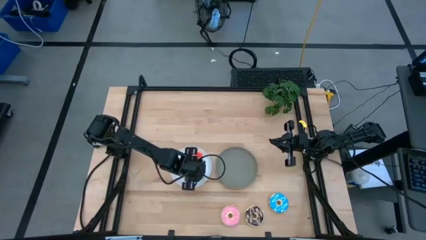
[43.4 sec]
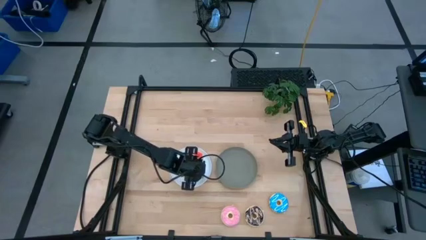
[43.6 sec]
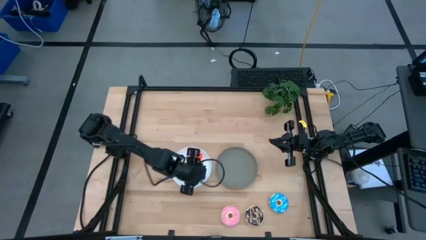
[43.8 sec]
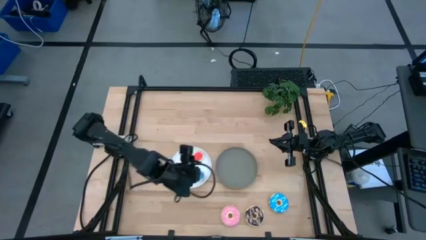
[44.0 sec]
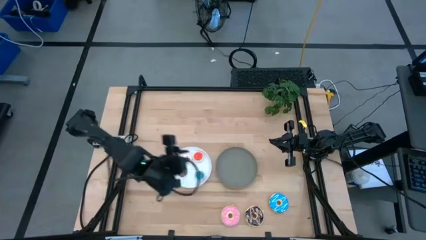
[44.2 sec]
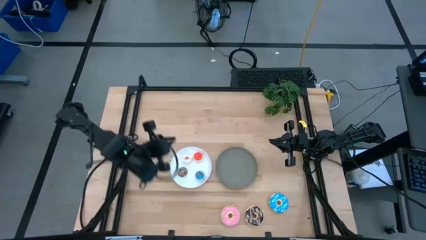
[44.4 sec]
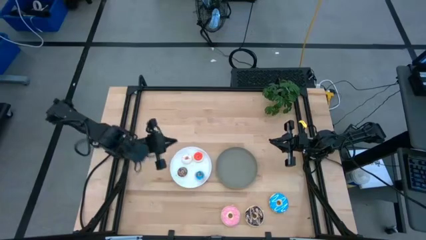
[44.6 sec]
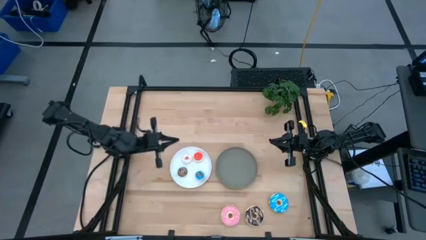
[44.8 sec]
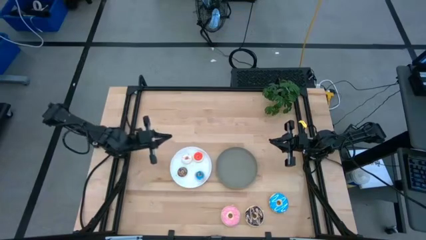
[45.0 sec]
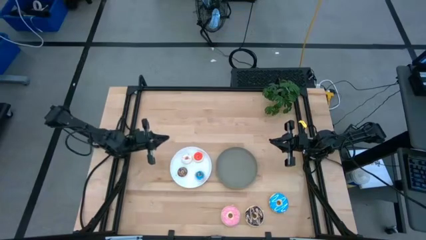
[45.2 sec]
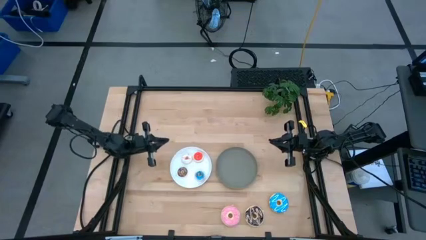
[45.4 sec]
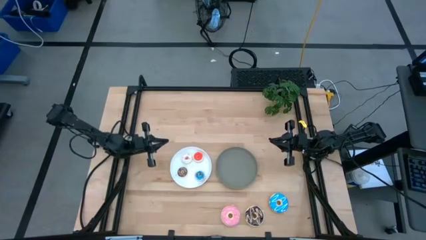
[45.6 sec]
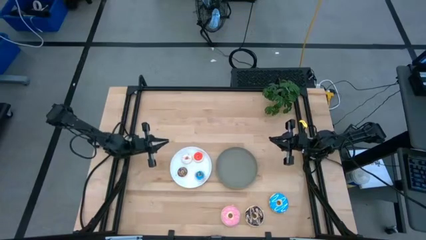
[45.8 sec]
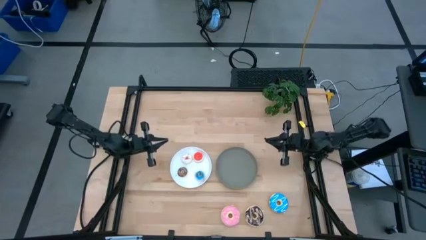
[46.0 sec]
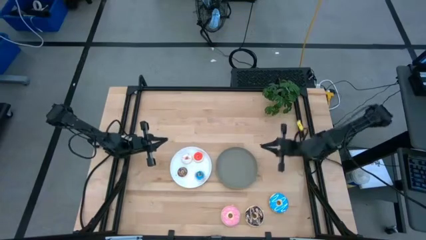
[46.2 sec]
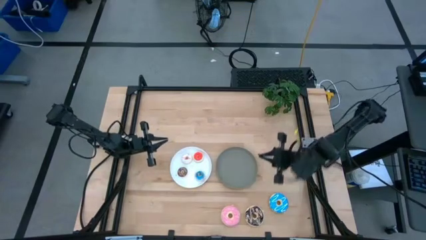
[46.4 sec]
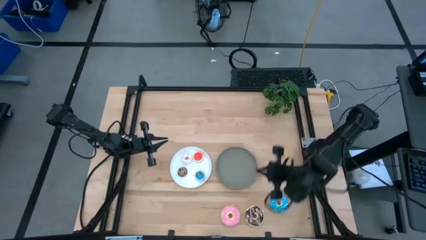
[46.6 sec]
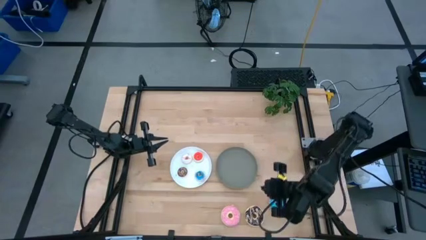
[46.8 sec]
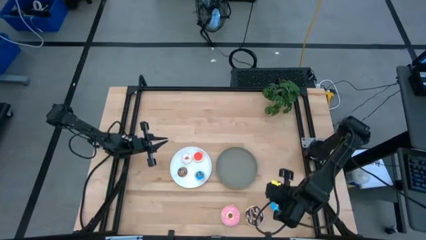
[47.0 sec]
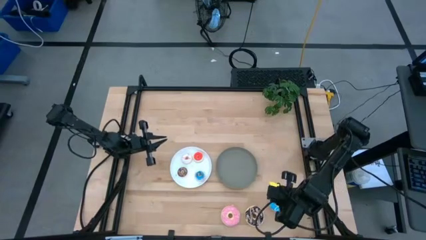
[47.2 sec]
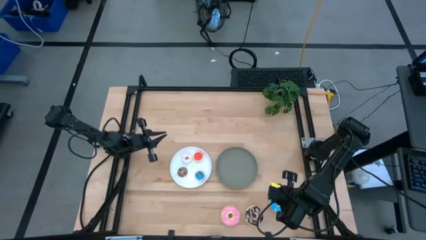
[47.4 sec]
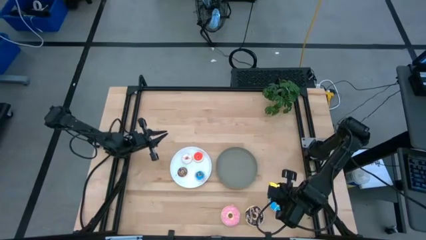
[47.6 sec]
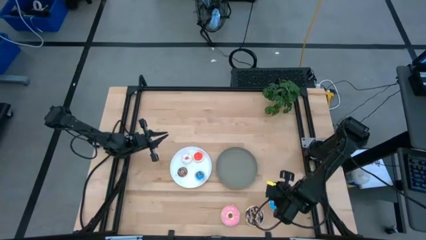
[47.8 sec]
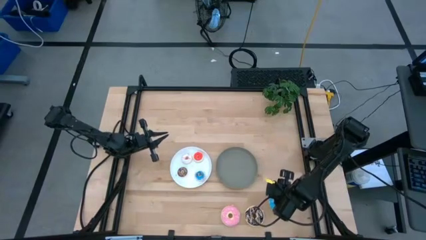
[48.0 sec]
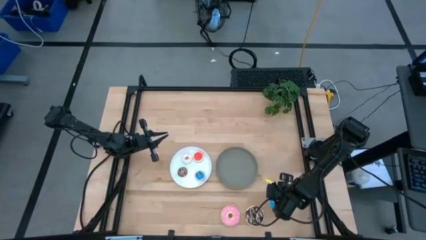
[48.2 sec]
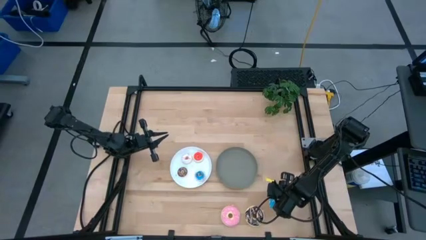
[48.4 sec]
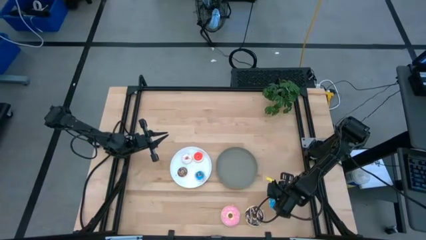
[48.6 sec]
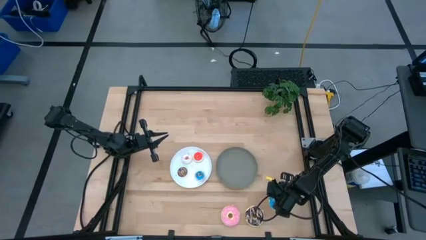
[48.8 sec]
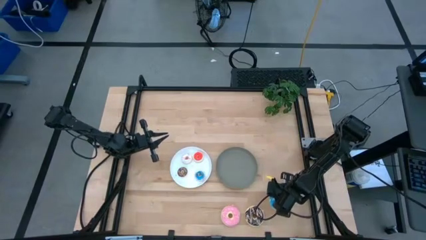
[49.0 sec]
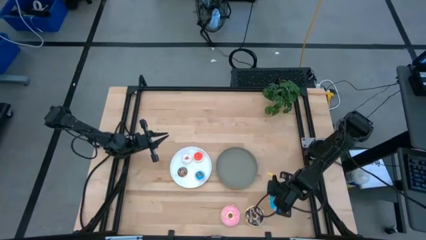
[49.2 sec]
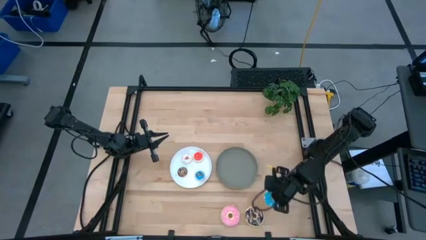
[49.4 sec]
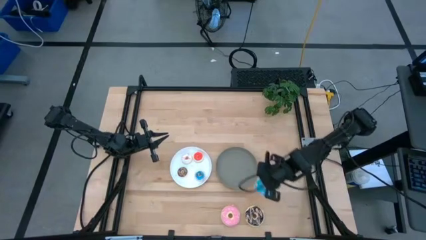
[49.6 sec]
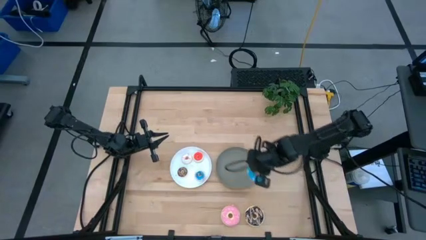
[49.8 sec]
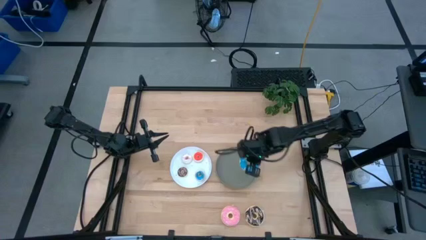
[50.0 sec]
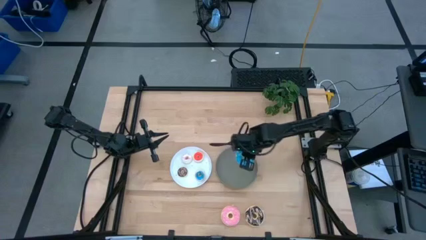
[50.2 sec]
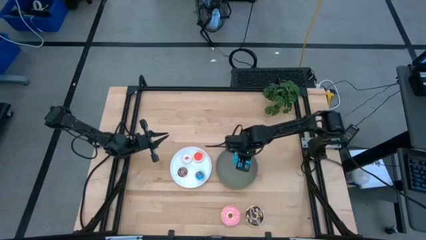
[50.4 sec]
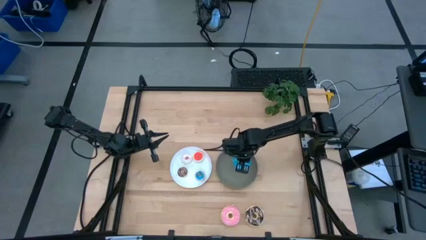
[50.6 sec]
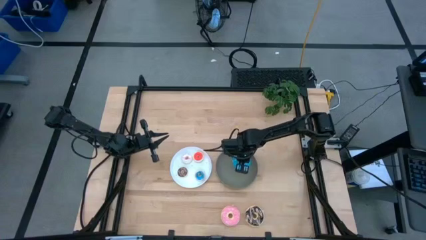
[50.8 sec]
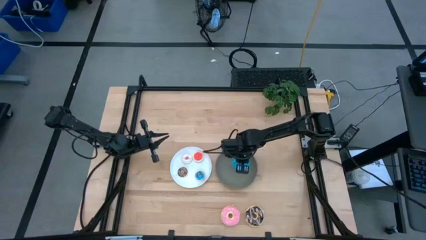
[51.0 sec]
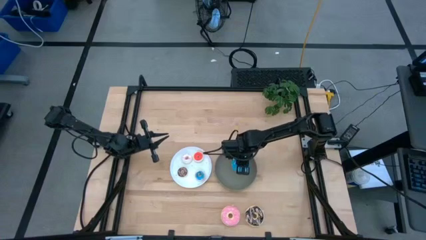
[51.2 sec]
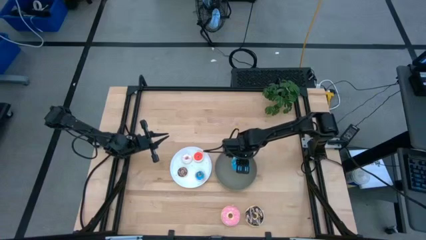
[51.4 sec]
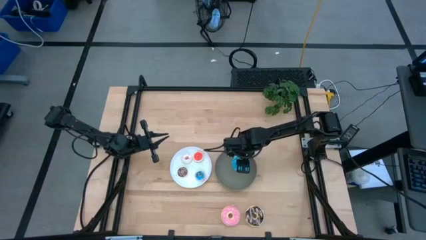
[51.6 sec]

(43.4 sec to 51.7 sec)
Task: Pick & Place donuts
Put the large blue donut on the gray plate

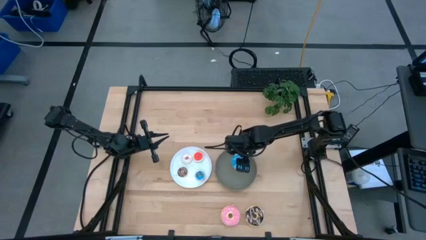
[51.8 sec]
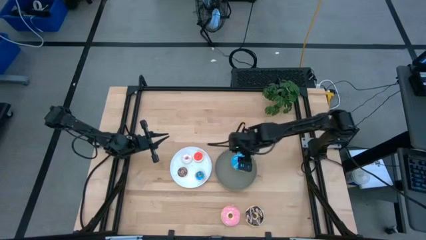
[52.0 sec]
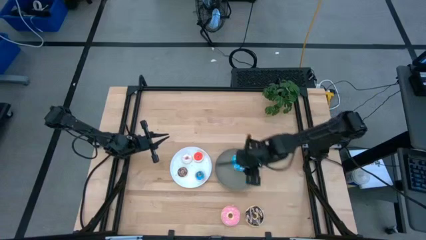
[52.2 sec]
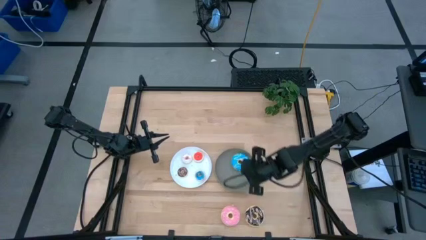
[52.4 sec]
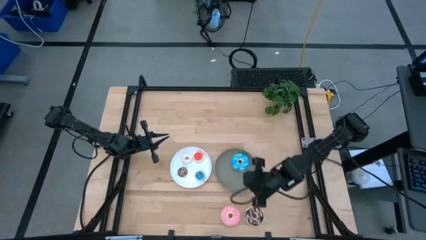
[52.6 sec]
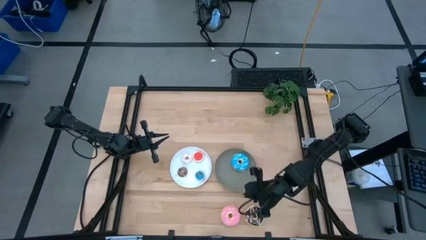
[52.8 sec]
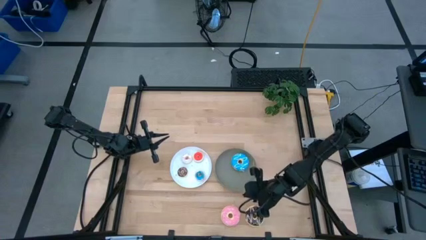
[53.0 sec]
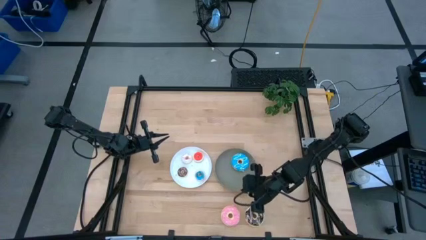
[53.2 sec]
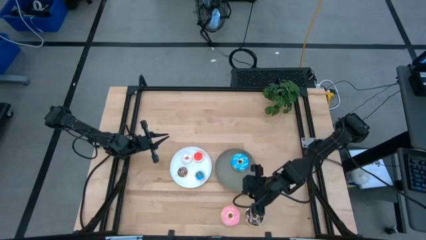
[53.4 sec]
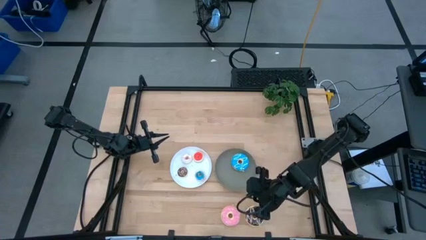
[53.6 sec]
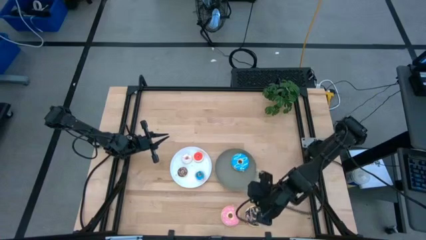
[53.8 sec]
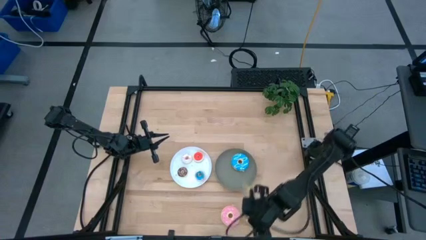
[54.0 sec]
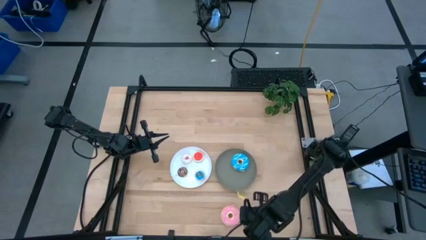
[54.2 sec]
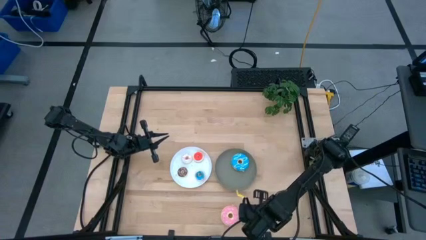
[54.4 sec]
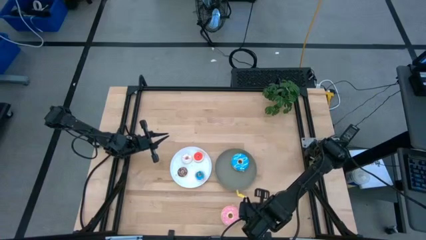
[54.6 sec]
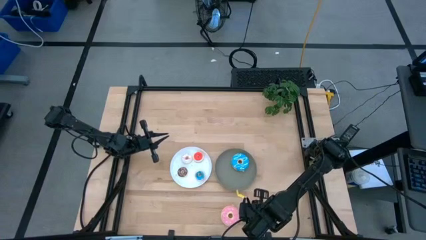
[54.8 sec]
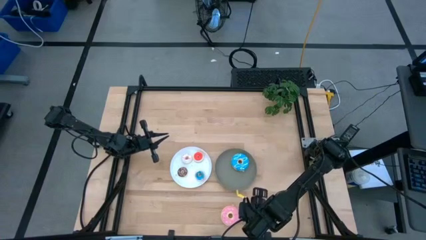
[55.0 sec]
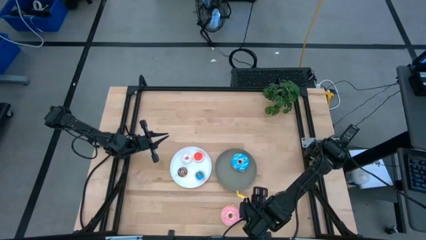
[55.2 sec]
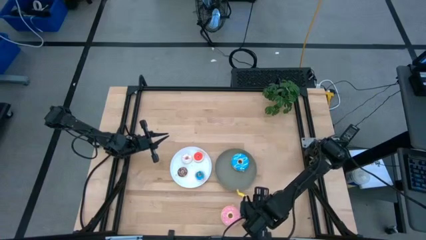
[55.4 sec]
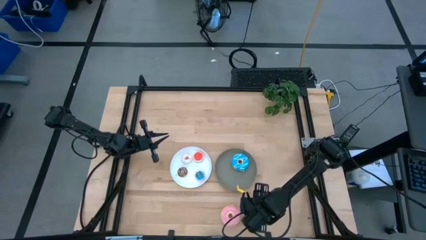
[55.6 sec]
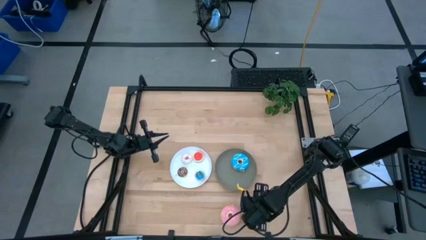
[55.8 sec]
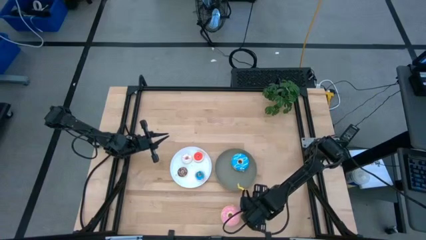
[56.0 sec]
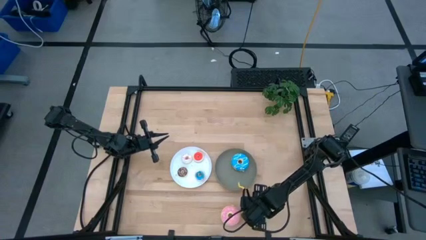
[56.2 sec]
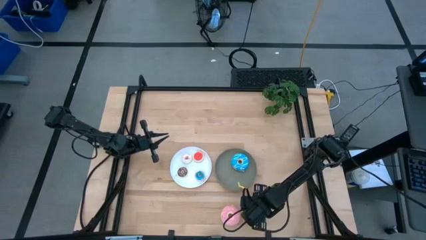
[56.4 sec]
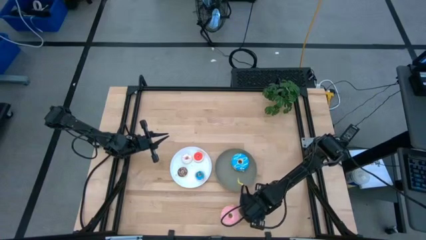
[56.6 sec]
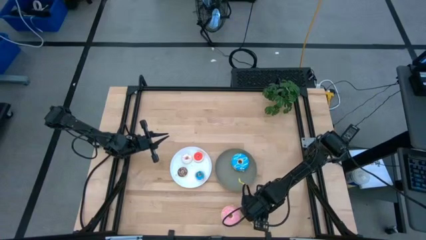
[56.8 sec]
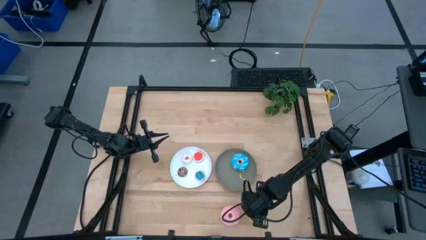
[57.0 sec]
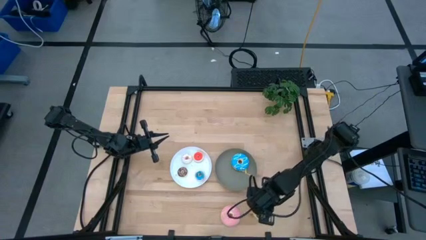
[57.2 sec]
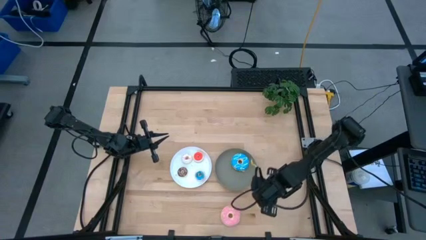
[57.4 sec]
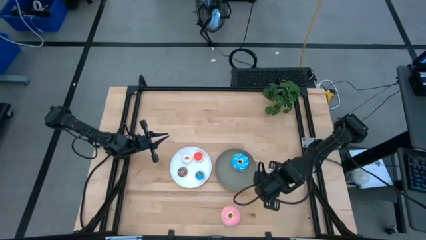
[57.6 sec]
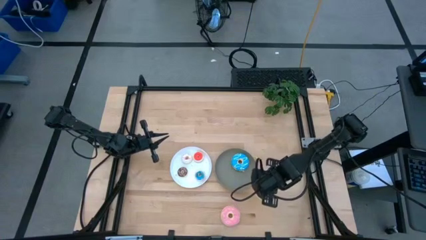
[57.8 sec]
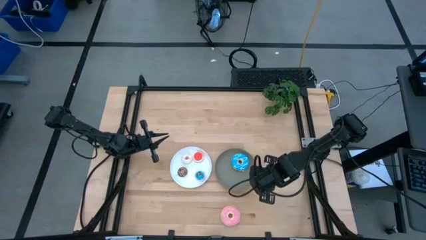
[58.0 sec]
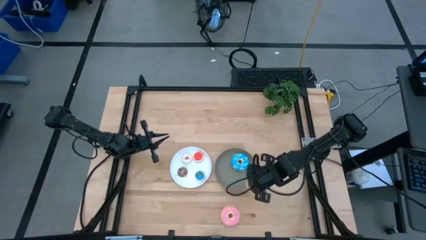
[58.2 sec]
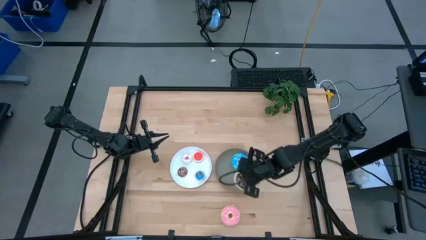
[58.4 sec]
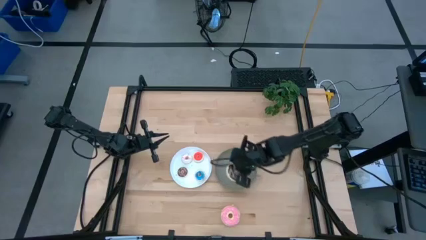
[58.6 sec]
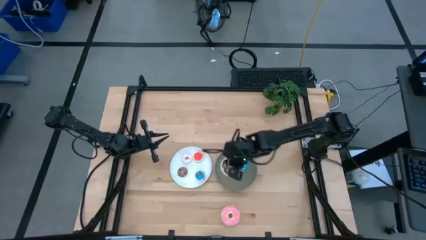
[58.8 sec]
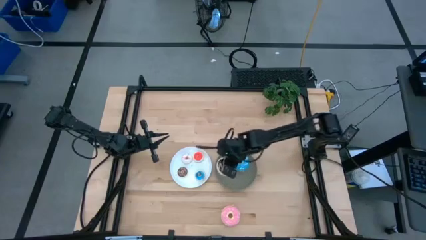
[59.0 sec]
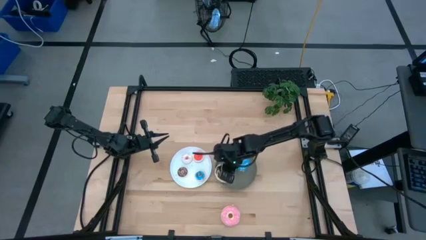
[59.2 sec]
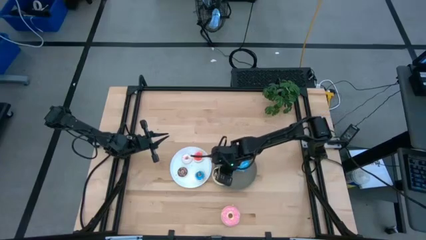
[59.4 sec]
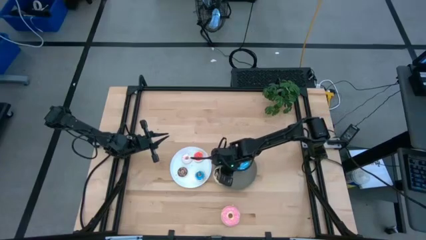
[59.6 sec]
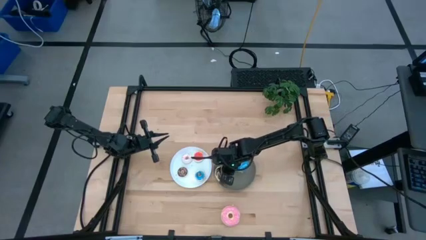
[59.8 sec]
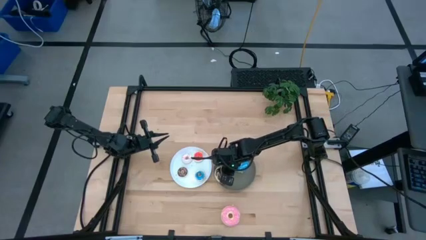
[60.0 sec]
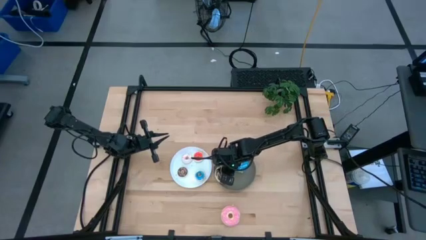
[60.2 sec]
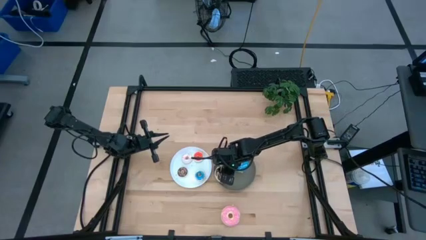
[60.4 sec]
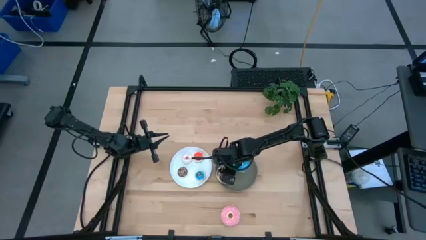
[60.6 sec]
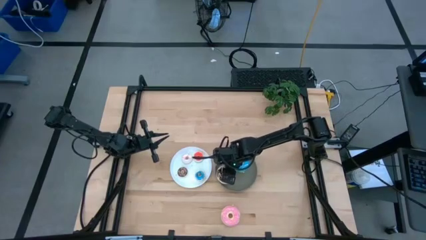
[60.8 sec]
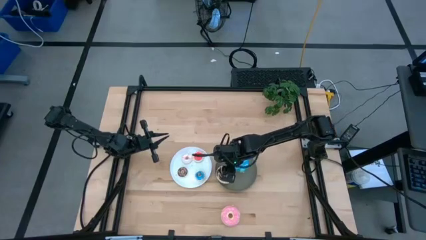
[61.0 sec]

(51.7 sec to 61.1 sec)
Put the large black donut on the gray plate
